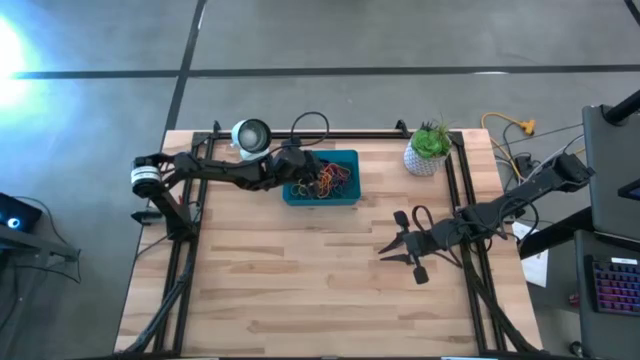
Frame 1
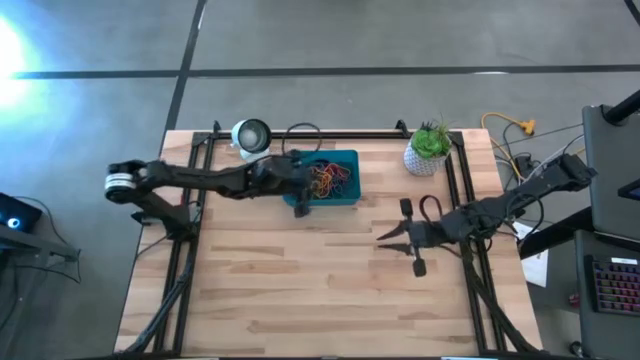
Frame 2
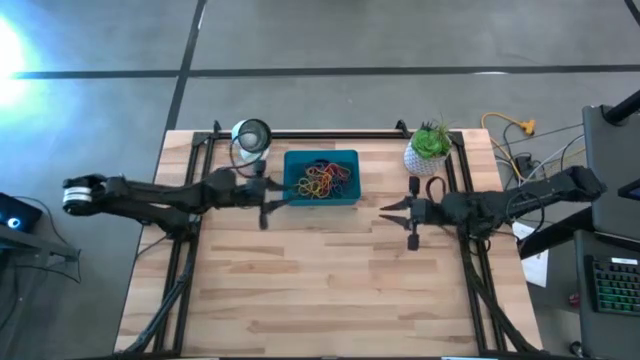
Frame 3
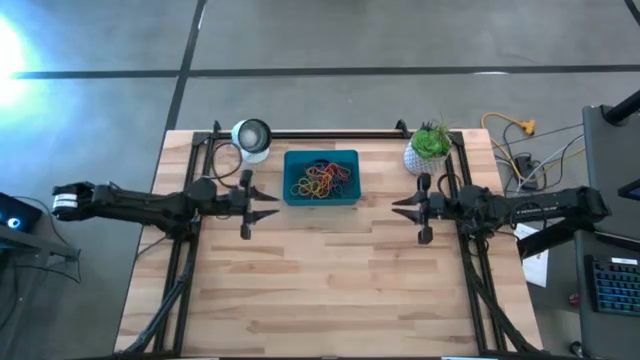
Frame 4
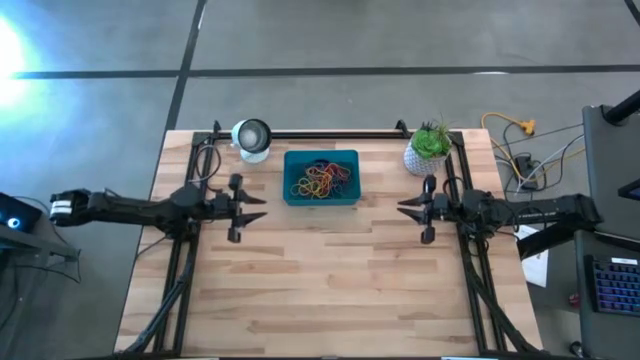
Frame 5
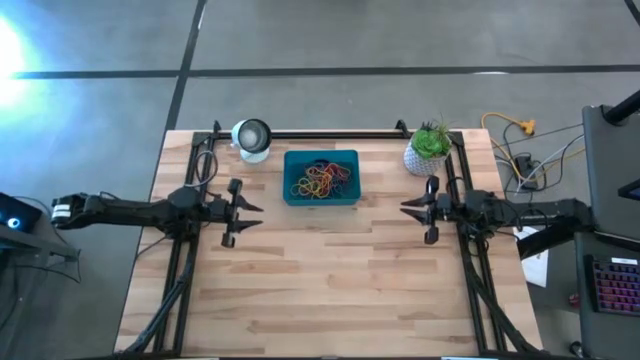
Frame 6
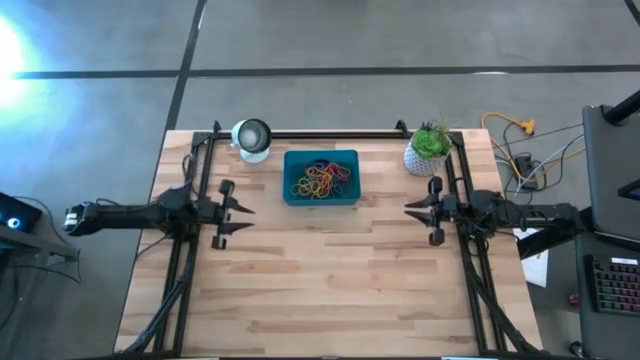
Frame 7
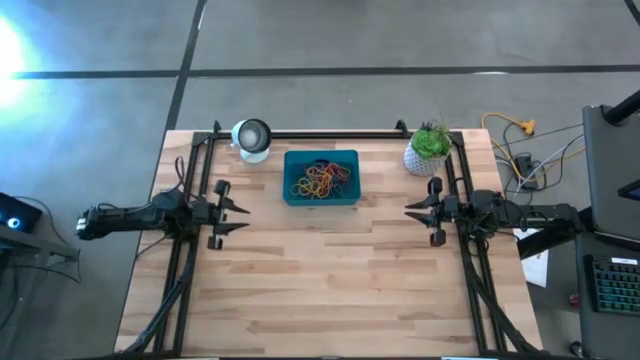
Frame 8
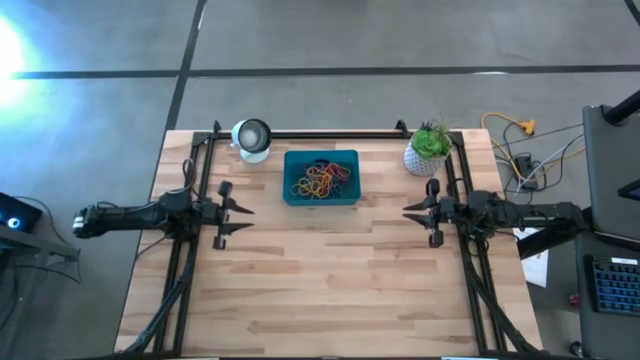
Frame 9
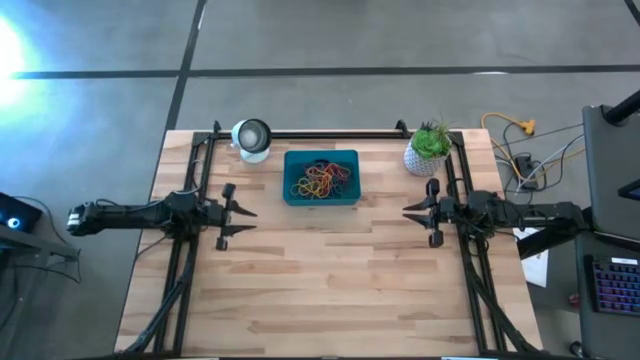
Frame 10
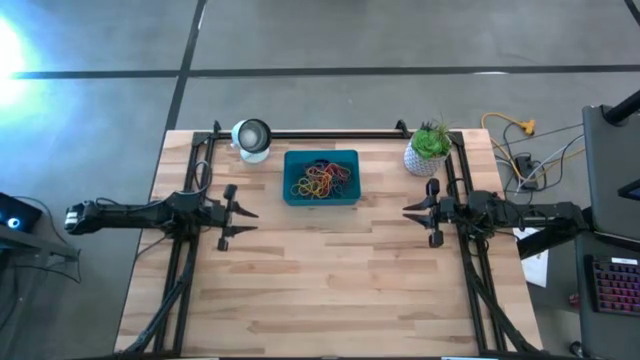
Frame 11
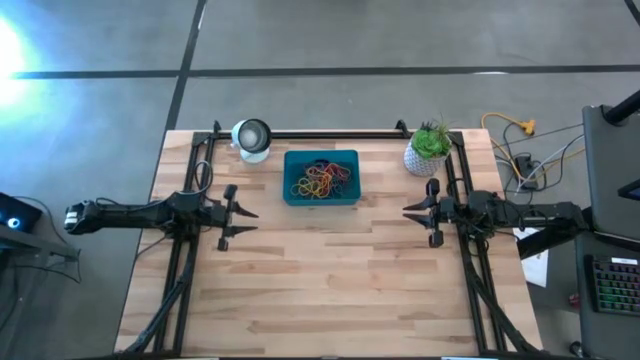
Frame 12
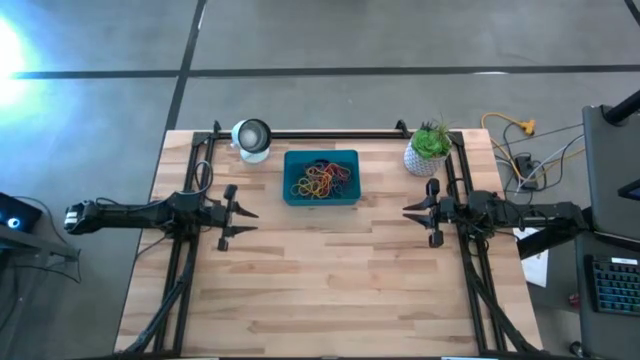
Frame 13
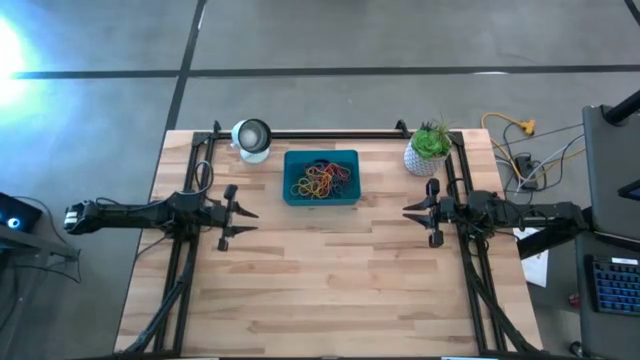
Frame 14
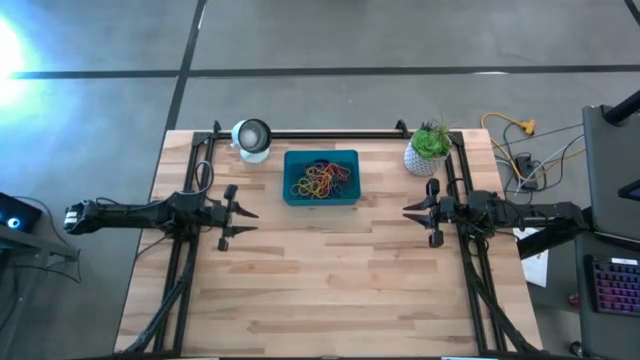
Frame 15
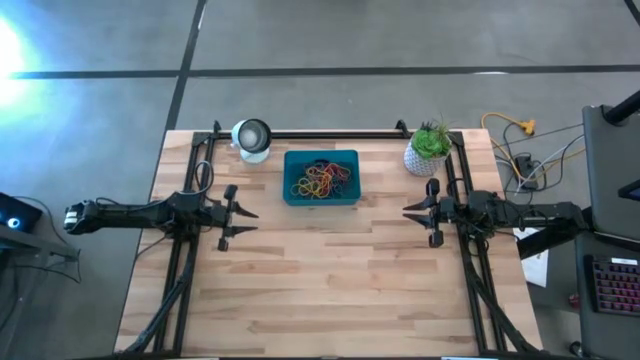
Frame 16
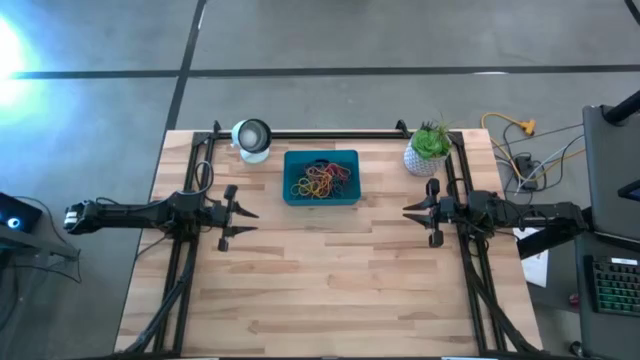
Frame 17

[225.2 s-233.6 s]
Task: Pick and place rubber bands into bin
Return to Home Position

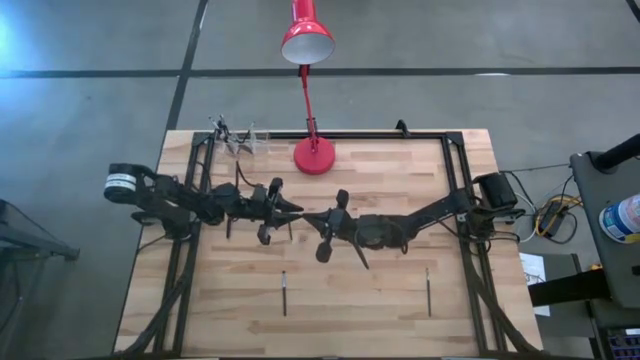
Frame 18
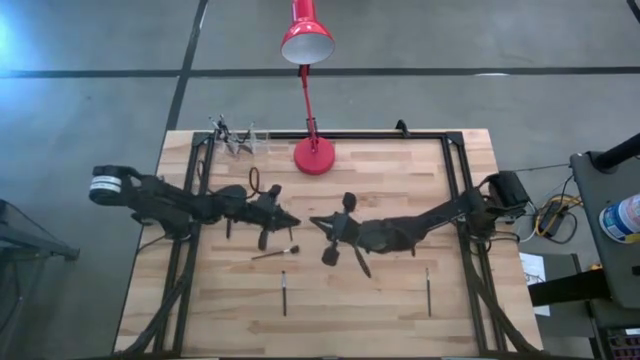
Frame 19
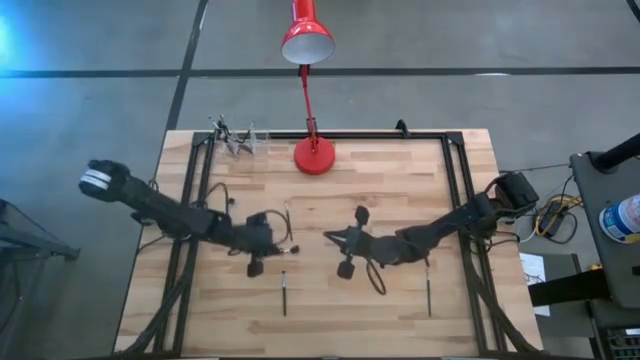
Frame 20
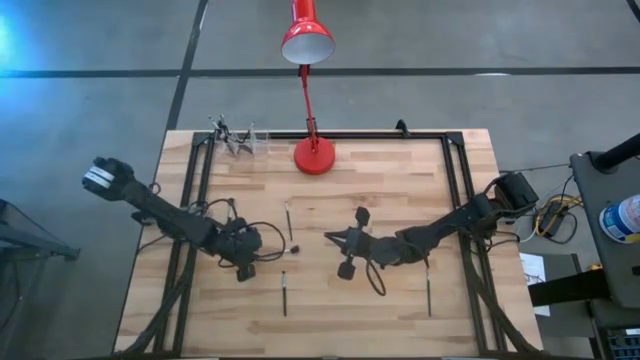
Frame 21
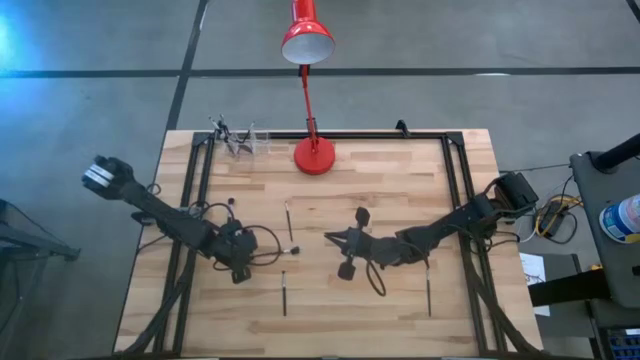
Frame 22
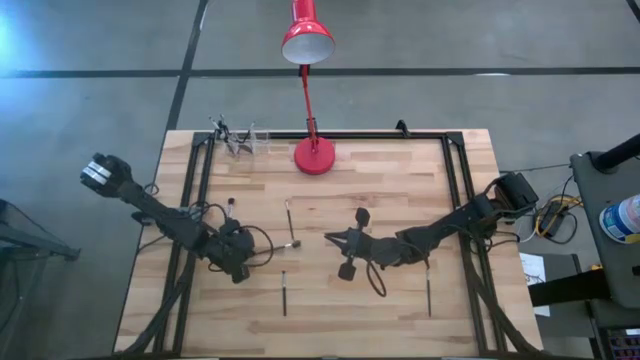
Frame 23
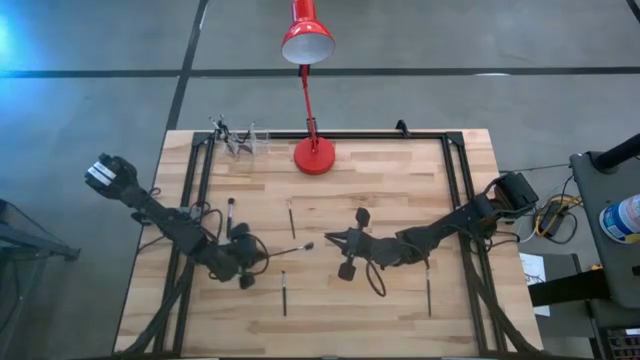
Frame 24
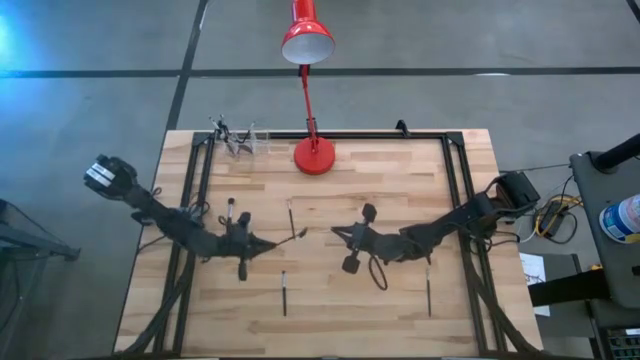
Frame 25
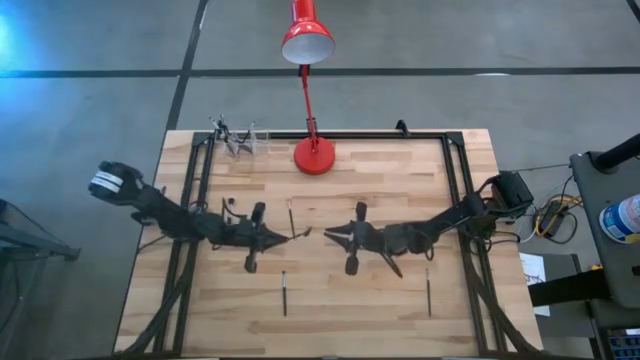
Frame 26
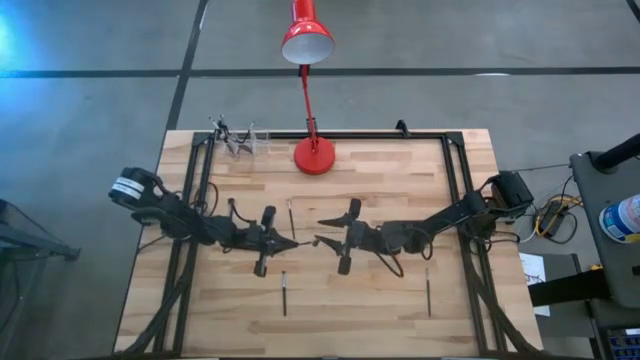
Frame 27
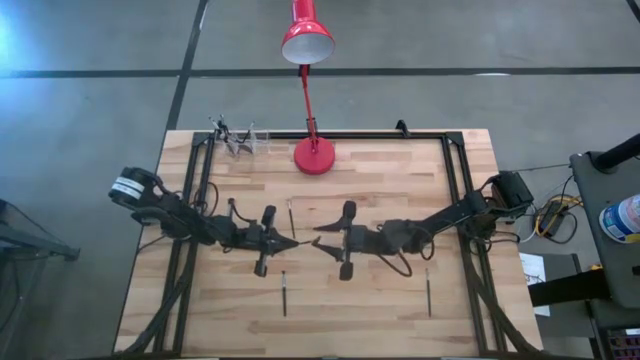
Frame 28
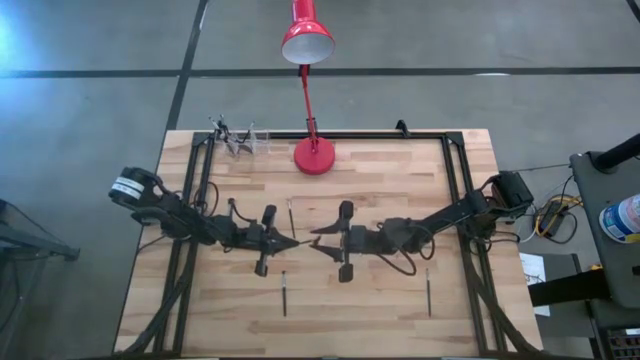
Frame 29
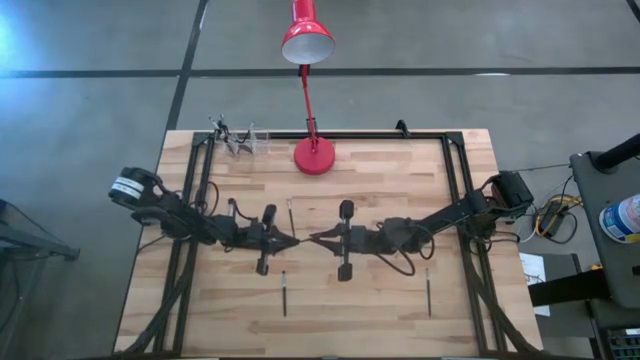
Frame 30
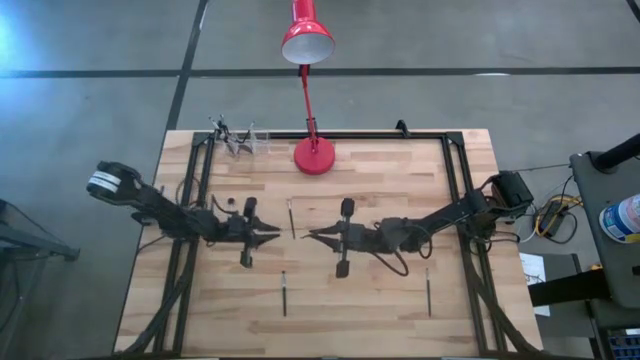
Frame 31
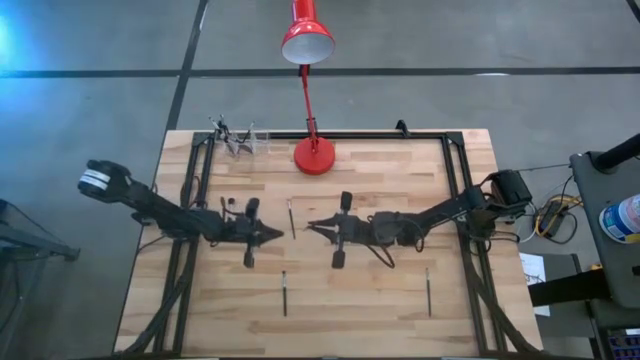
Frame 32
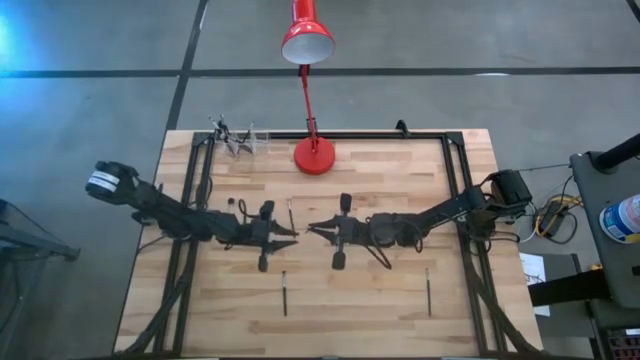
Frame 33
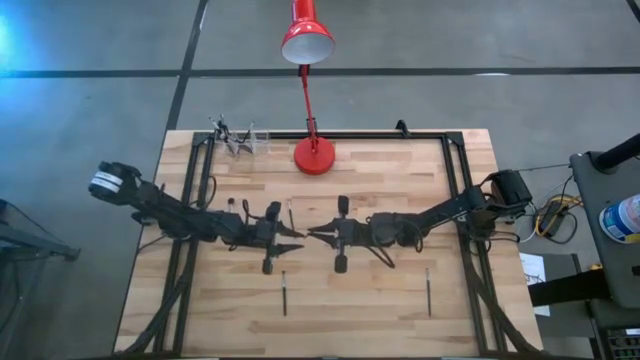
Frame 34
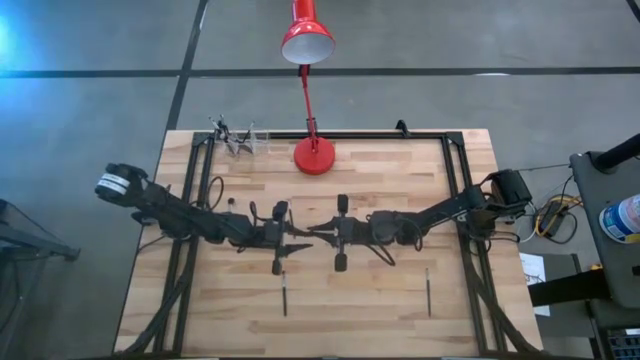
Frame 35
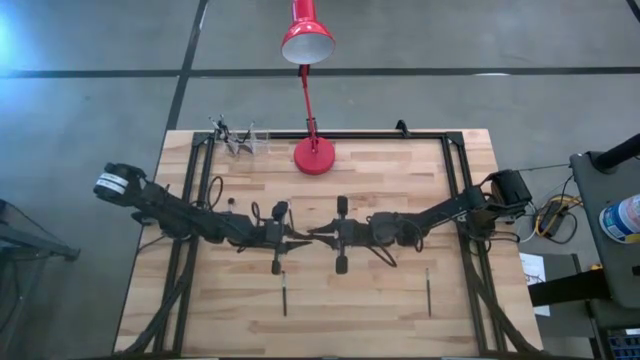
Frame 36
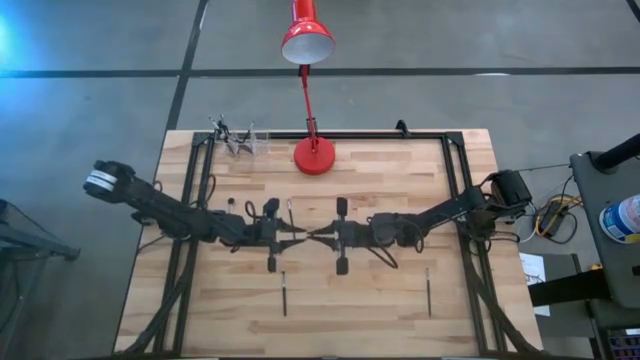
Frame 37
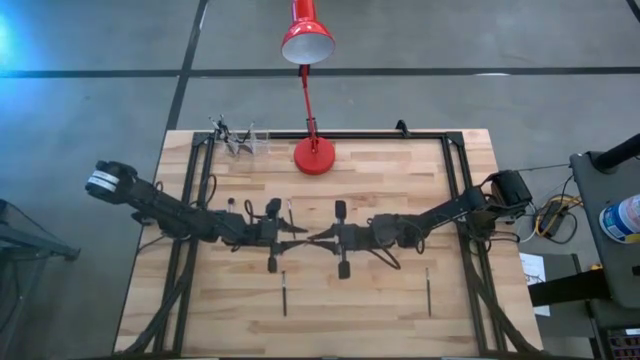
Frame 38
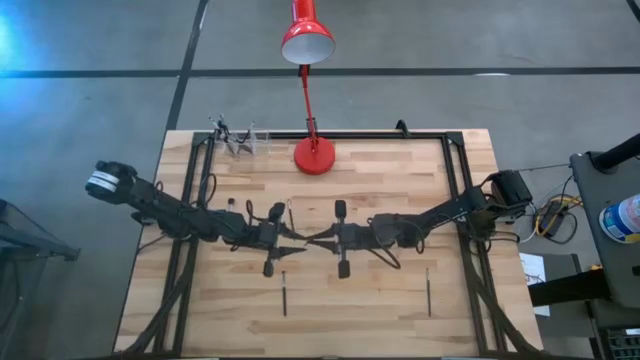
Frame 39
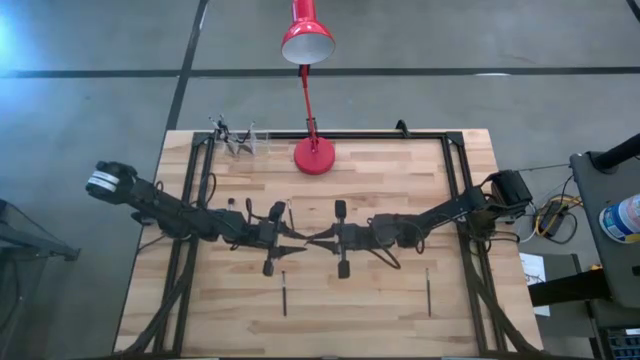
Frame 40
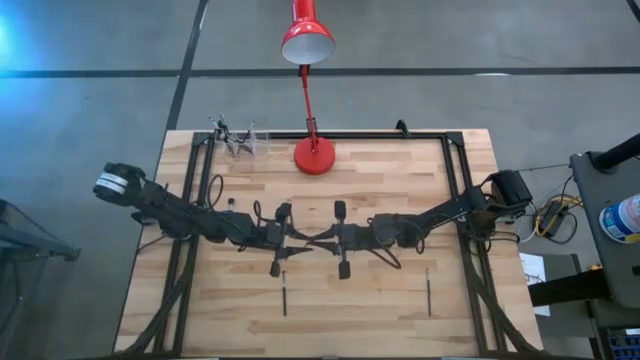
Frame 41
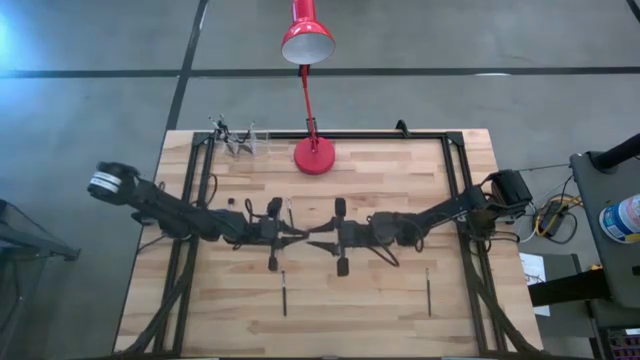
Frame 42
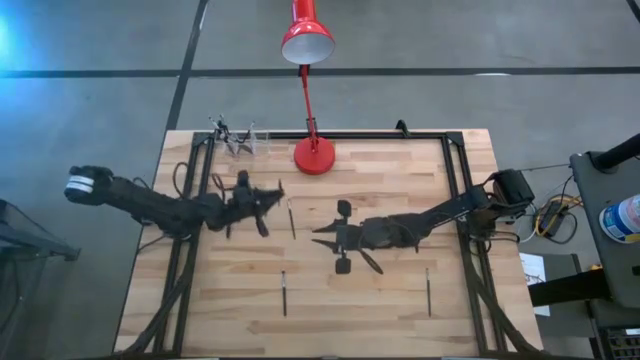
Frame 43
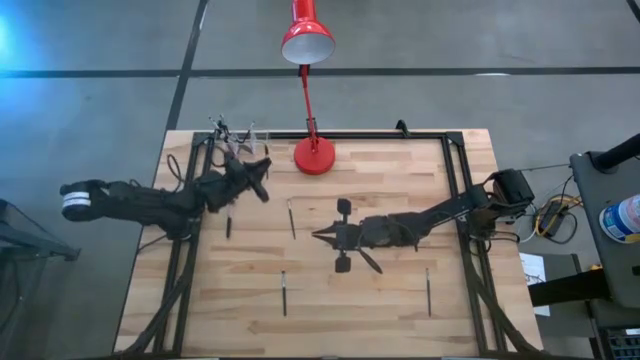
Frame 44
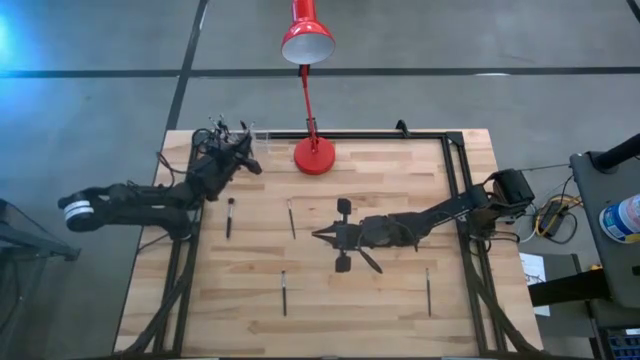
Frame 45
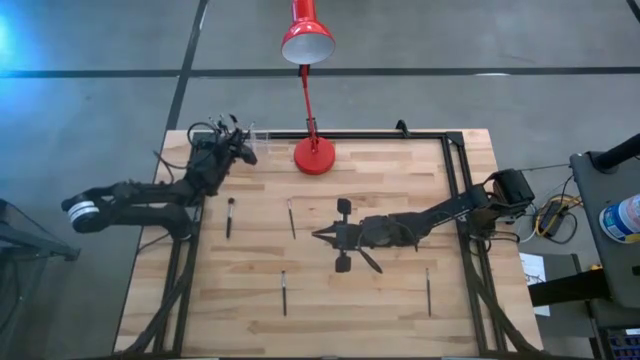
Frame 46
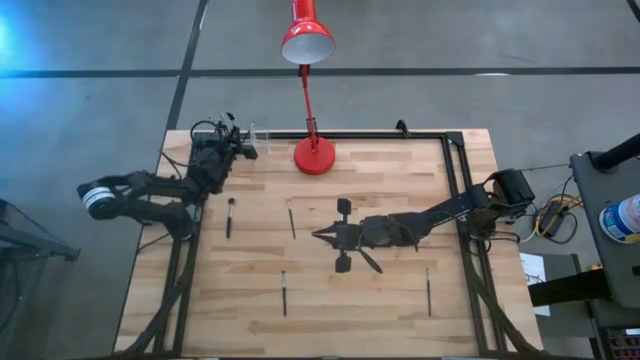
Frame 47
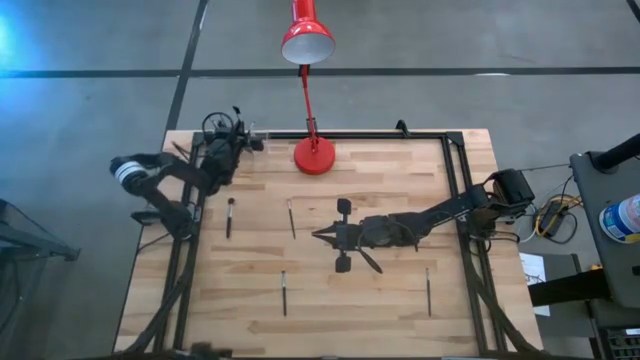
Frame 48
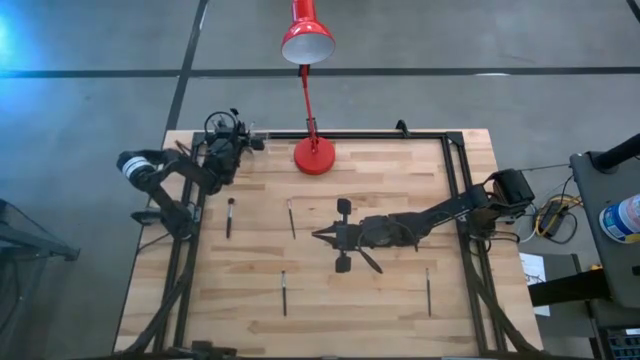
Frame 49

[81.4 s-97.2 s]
Task: Pick & Place Makeup Supplies
Put the makeup brush into the transparent organizer
